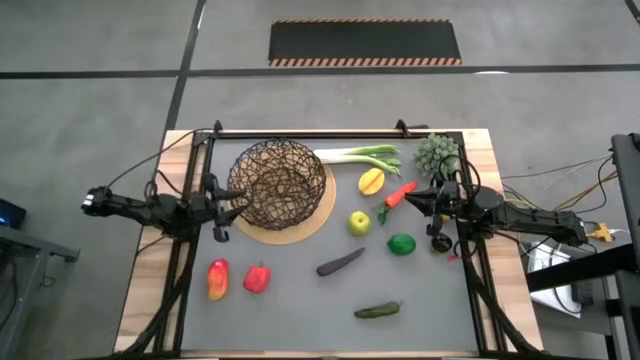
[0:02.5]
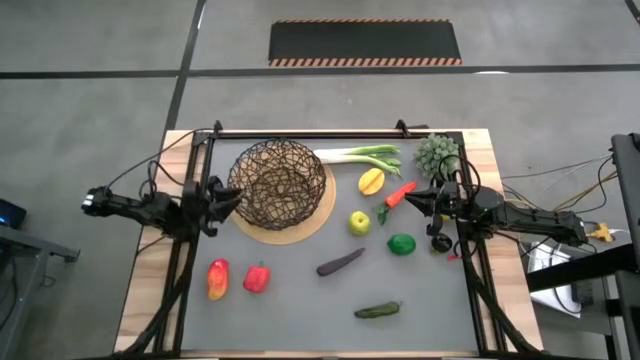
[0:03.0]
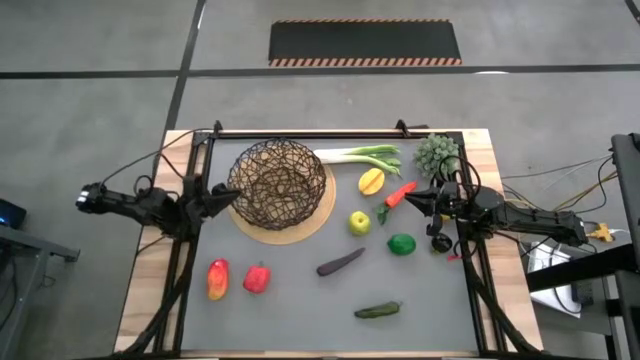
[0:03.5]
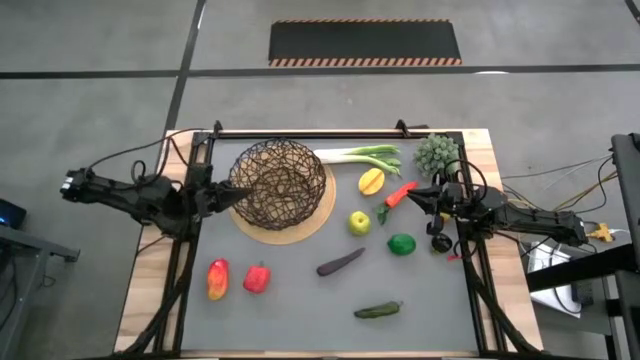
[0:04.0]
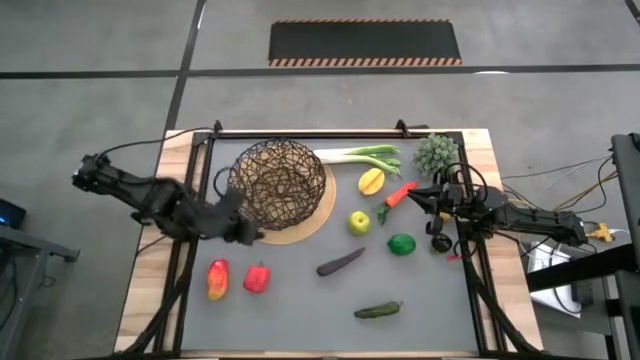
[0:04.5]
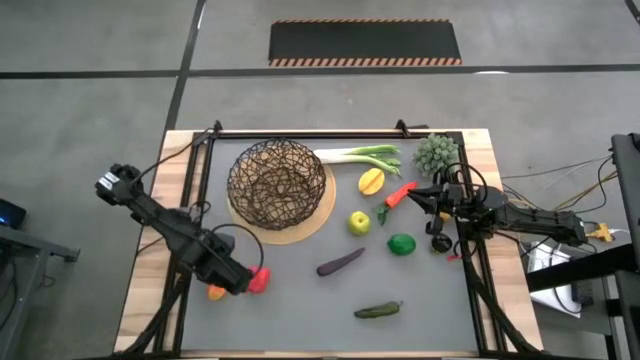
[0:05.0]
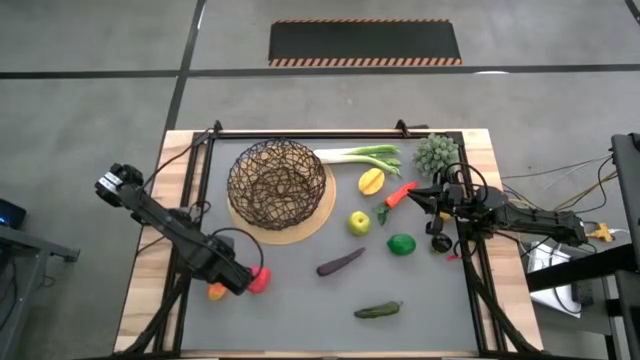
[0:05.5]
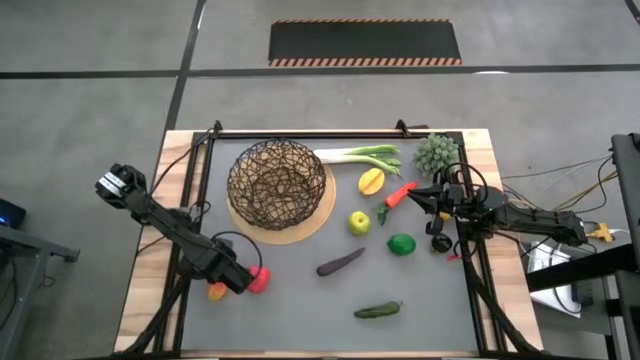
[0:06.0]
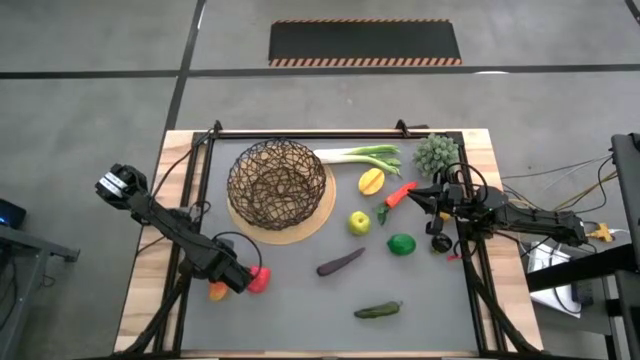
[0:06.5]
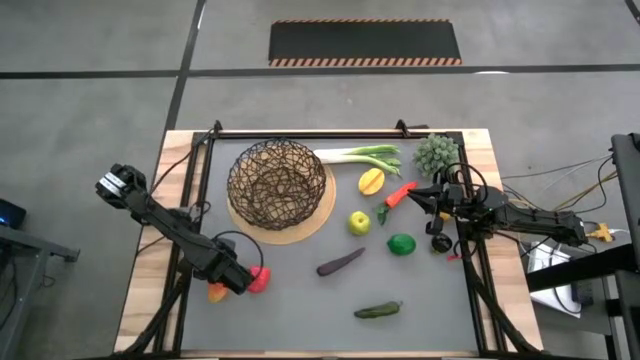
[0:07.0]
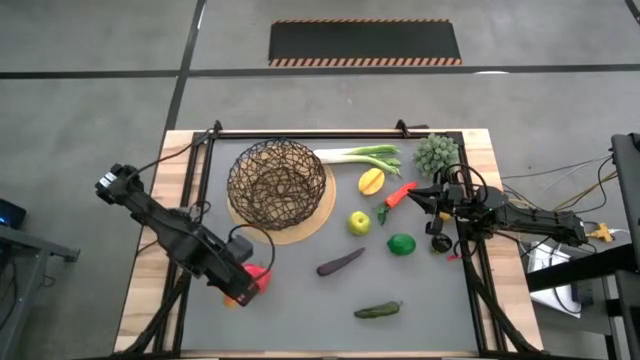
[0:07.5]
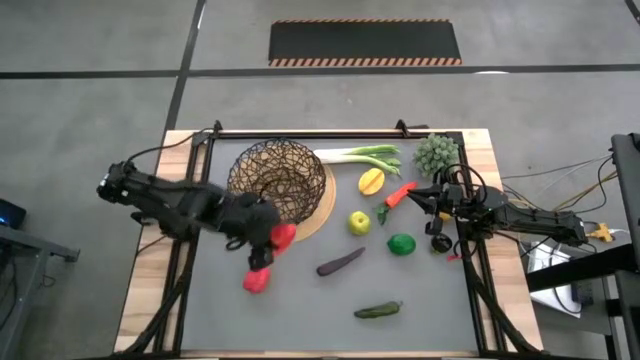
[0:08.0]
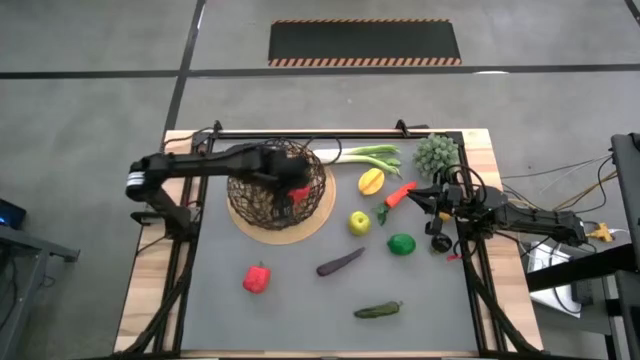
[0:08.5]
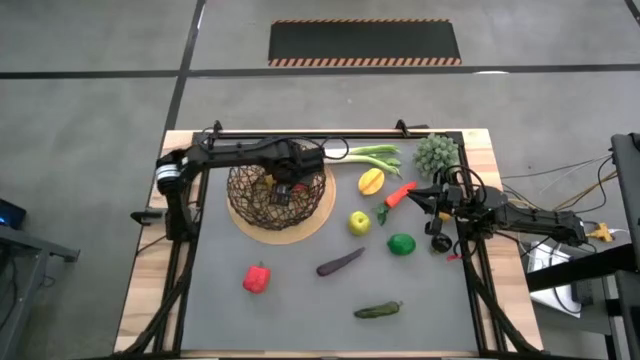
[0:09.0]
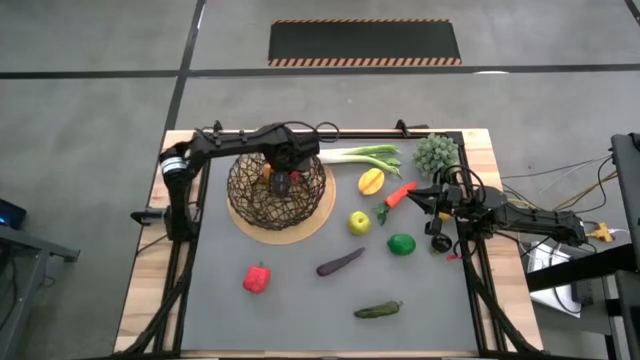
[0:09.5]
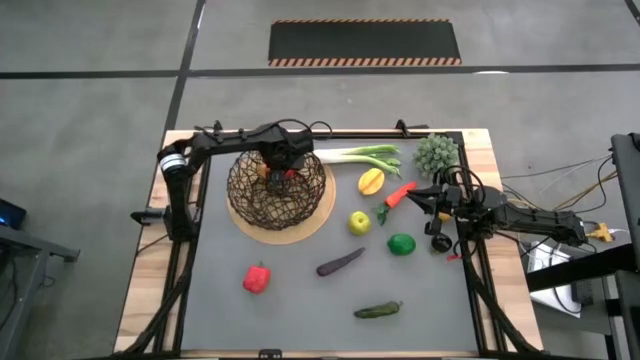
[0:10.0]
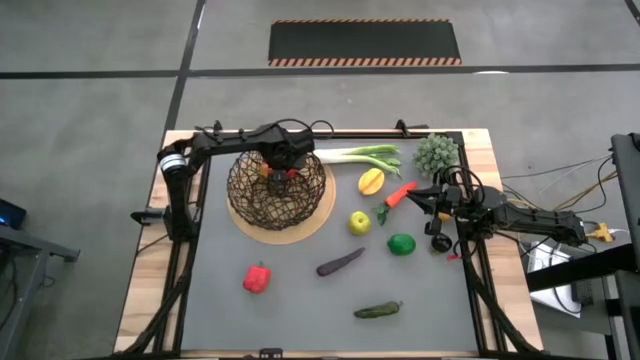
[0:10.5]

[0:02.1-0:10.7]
Task: Build produce basket
Put the red mango into the black wire basket

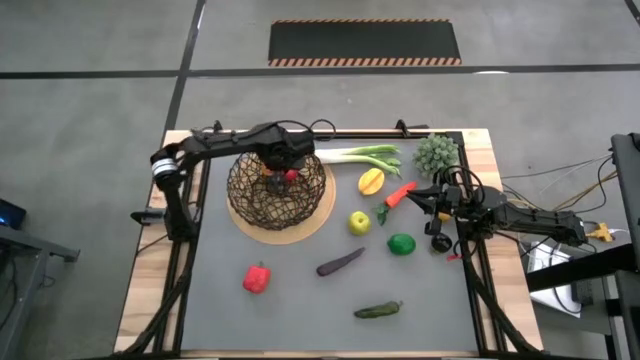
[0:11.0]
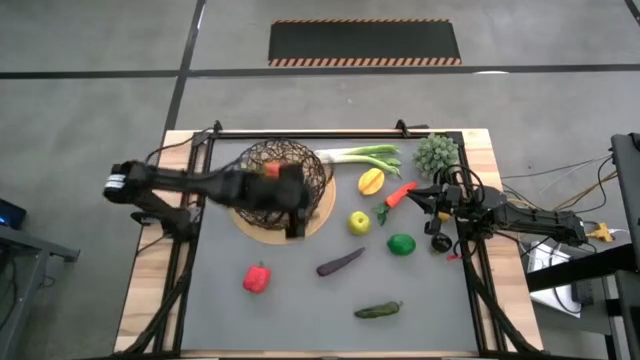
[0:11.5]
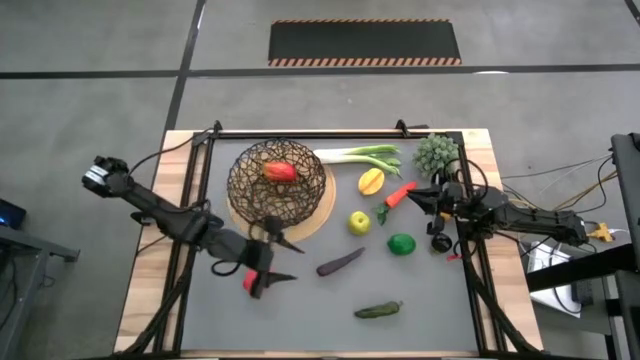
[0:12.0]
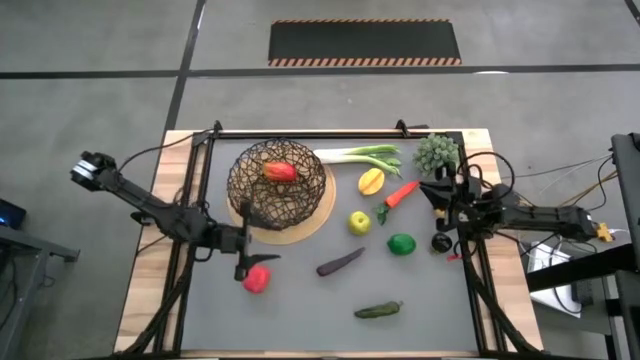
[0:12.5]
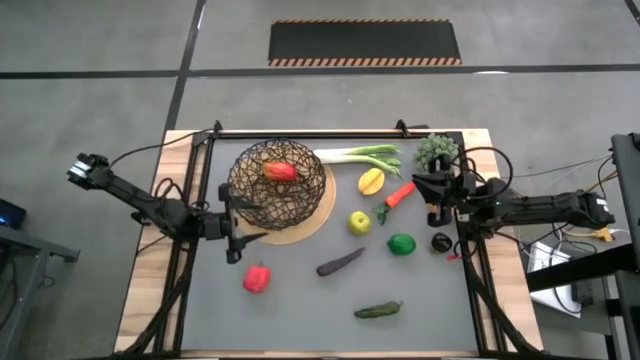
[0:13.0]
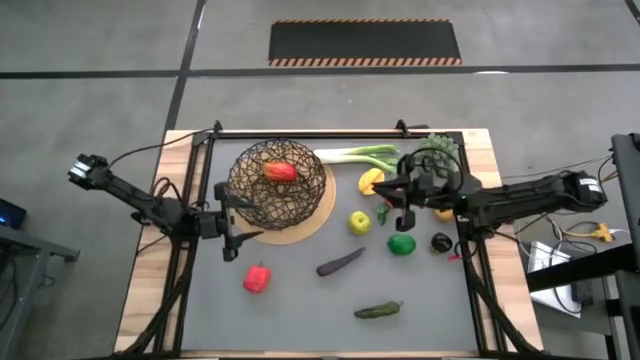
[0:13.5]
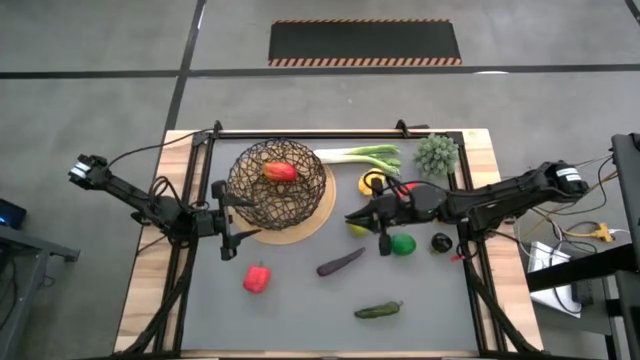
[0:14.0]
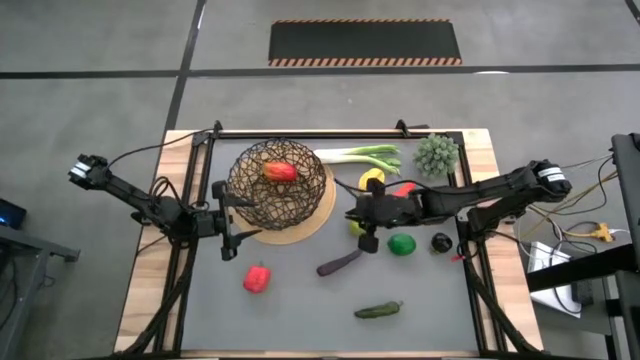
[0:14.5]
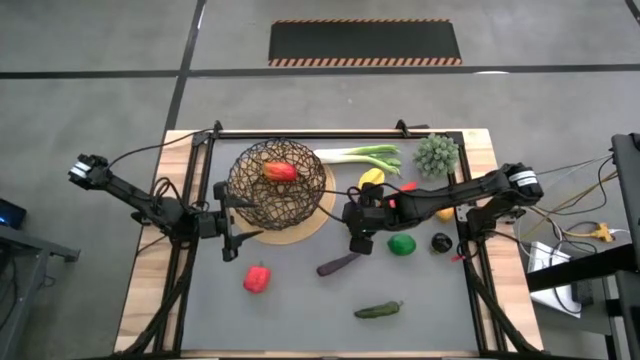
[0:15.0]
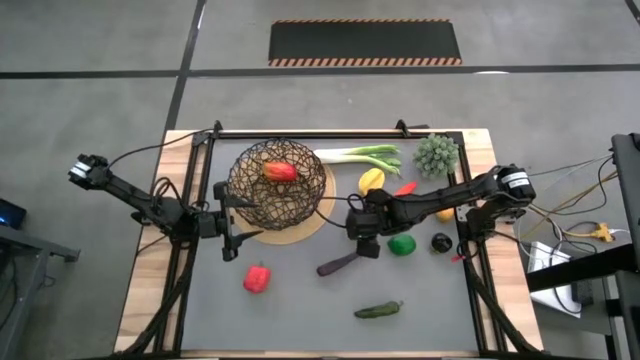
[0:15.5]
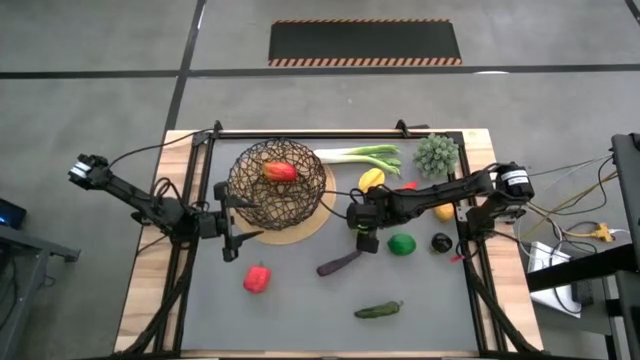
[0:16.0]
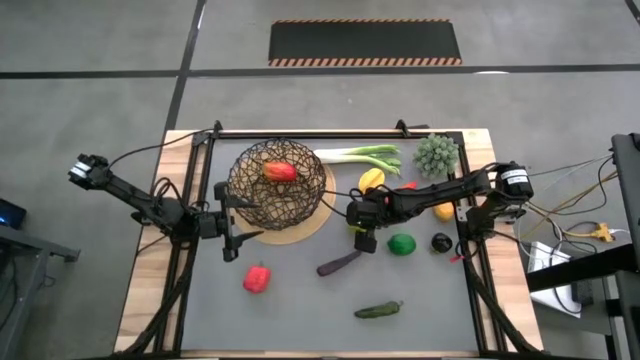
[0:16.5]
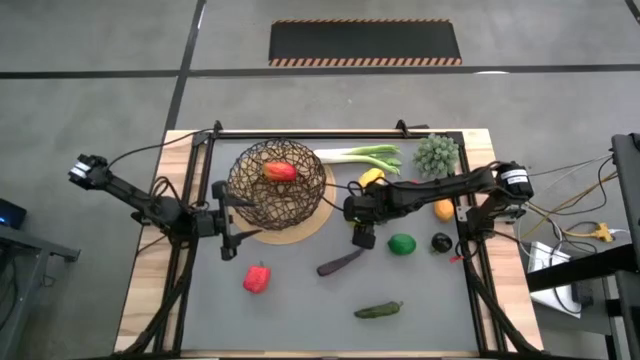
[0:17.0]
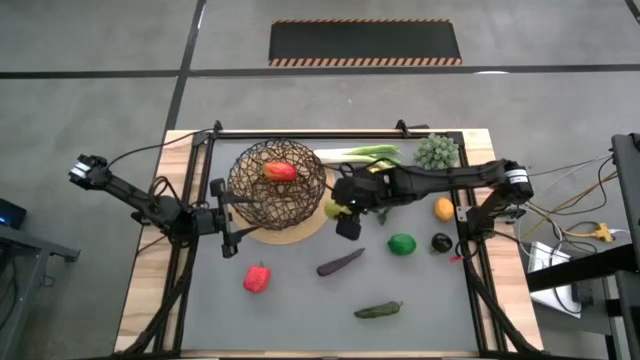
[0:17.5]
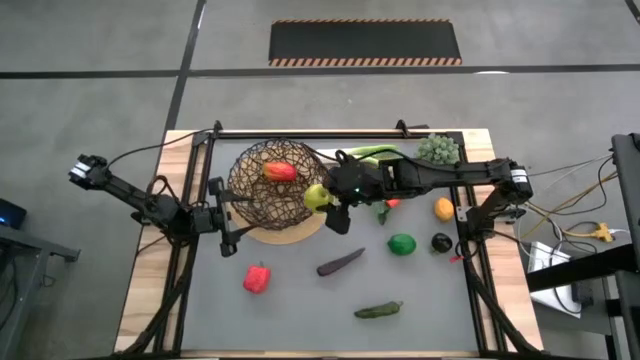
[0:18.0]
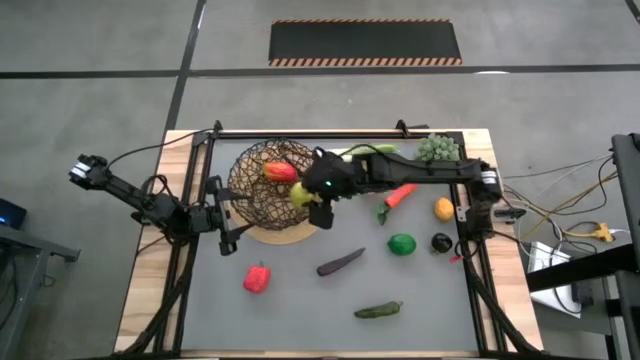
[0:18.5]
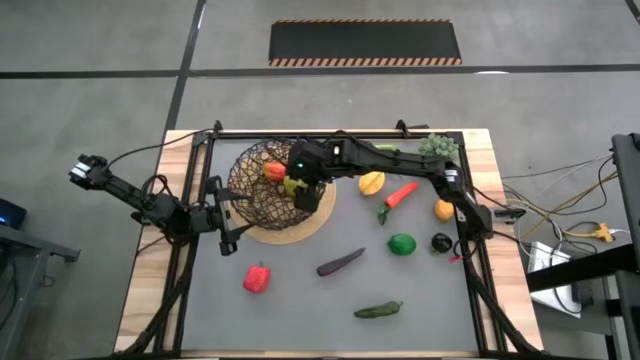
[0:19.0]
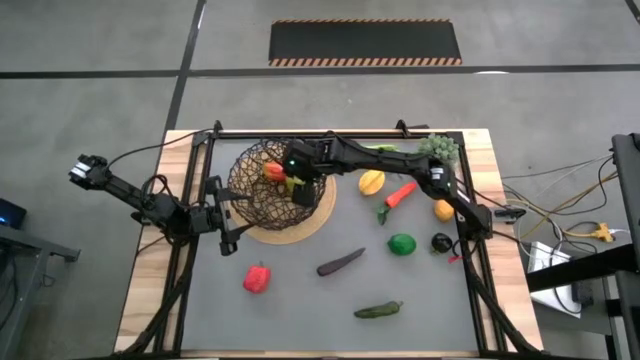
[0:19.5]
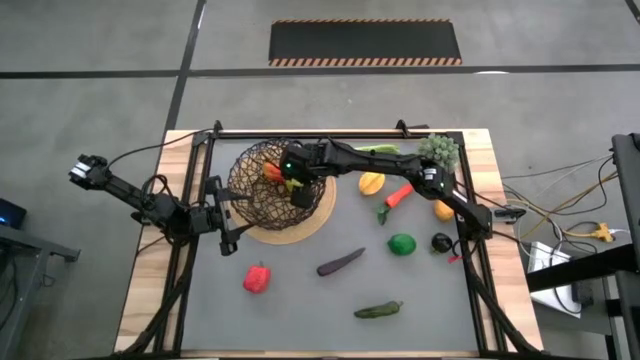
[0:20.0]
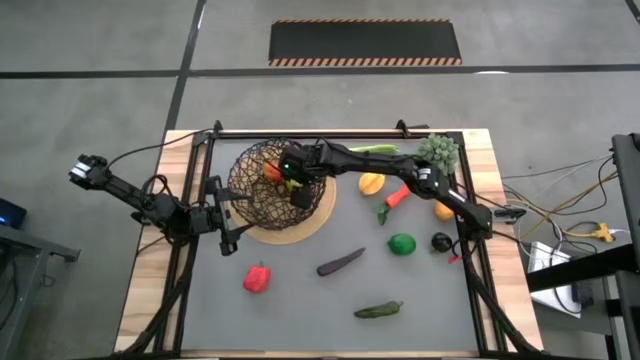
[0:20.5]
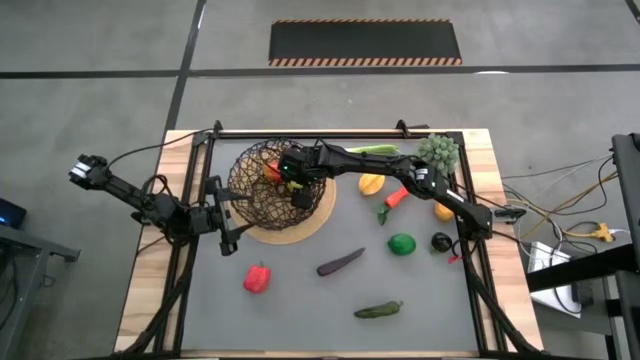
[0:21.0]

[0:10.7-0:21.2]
Put the green apple into the black wire basket
